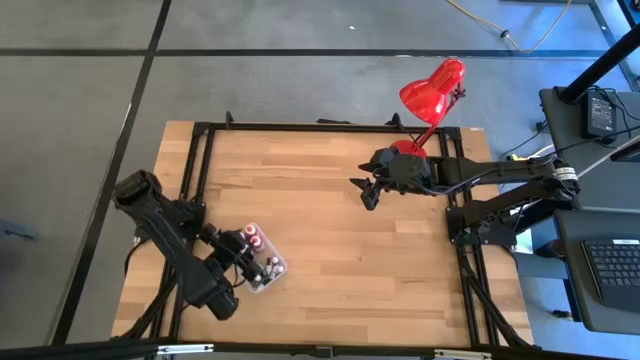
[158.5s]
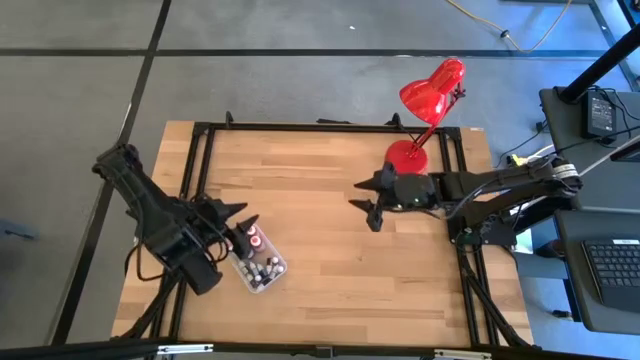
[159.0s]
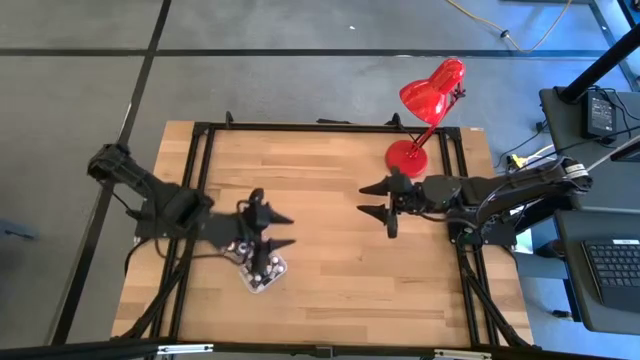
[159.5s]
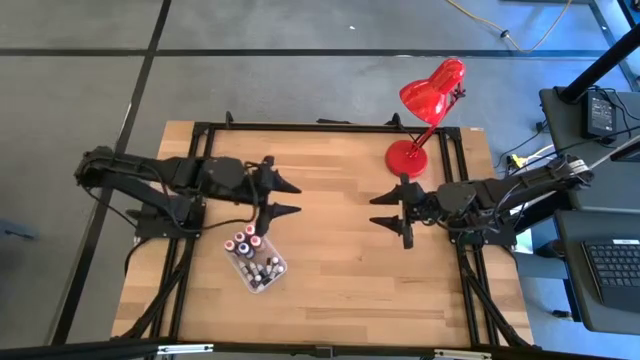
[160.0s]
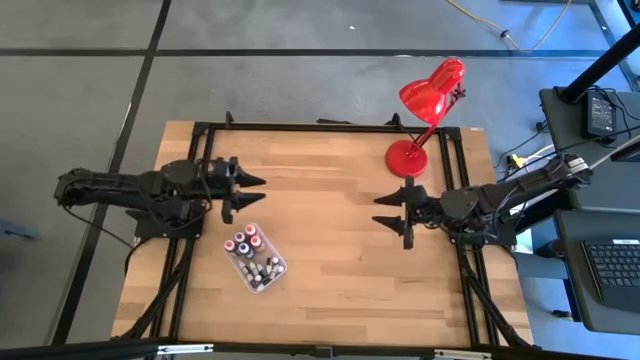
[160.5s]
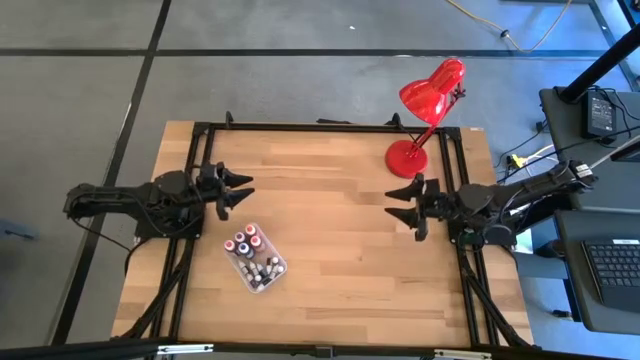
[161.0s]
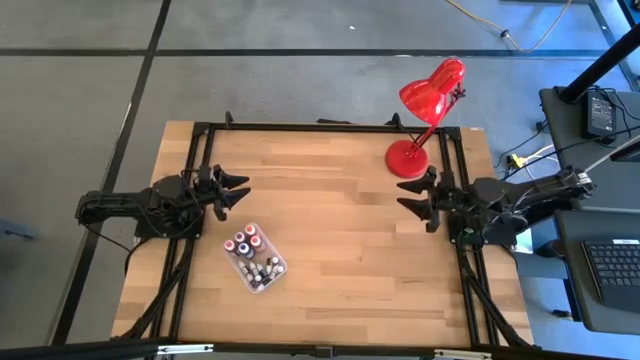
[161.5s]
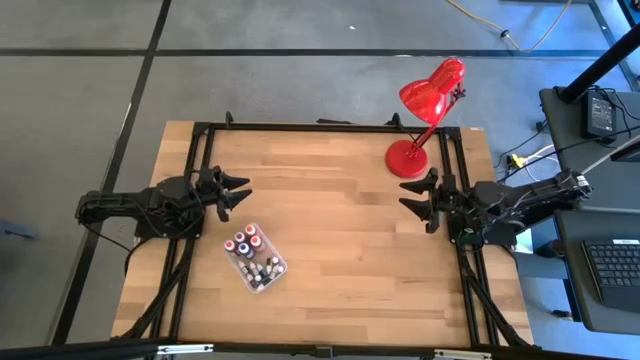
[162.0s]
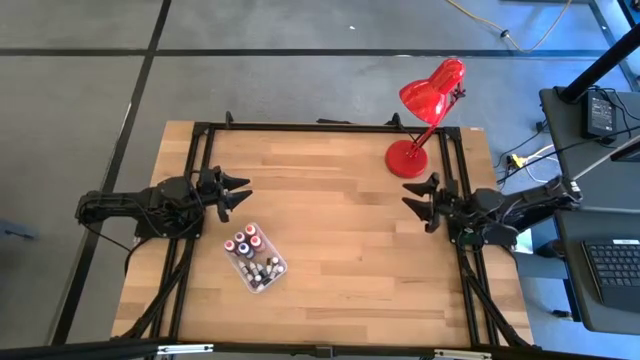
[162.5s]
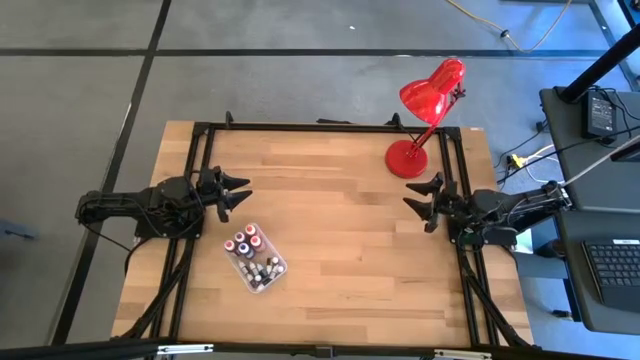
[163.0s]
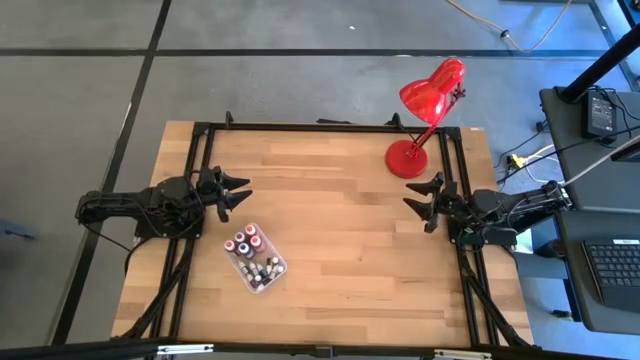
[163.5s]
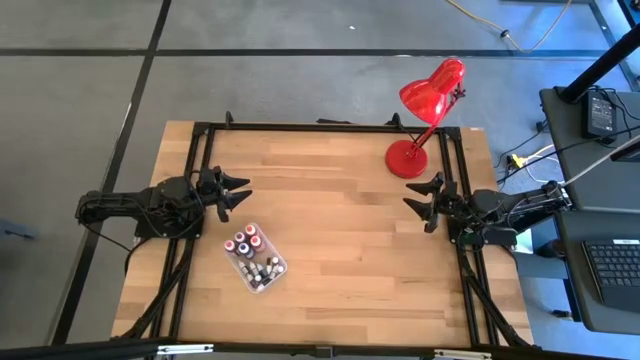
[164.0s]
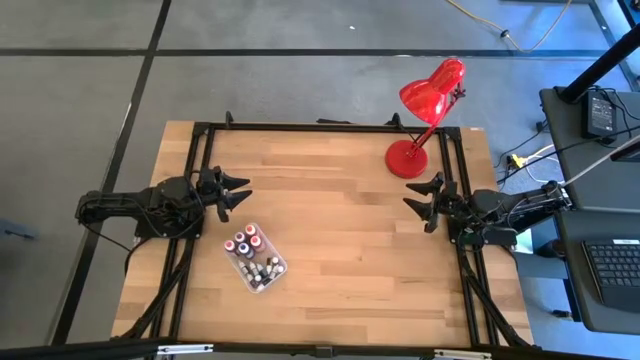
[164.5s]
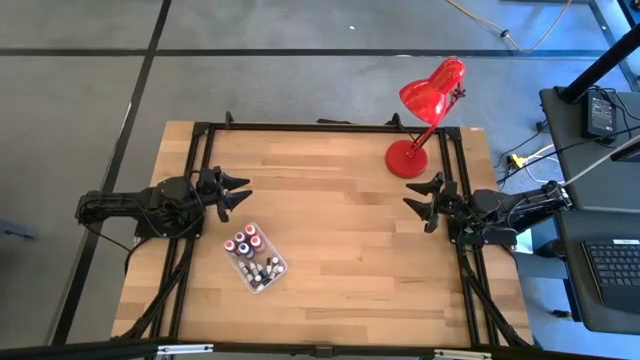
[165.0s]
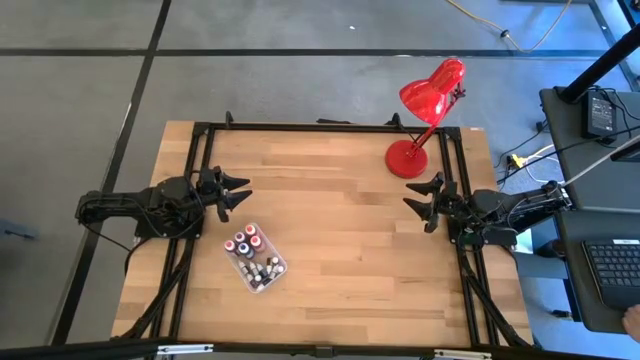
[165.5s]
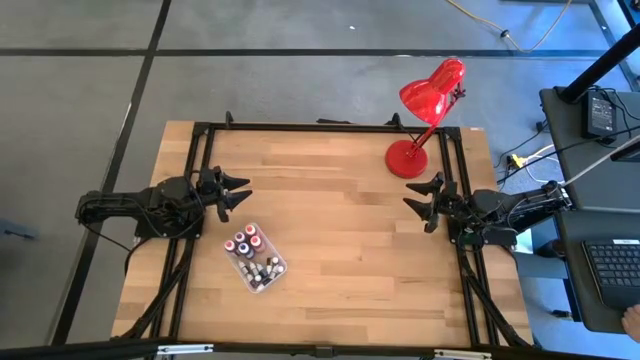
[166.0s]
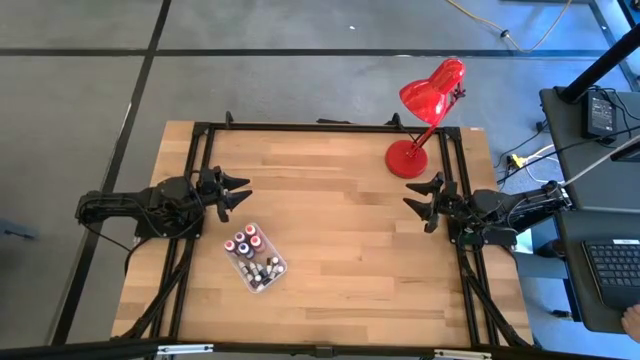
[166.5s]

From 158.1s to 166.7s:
Task: Pick & Place food coloring
Return to Home Position

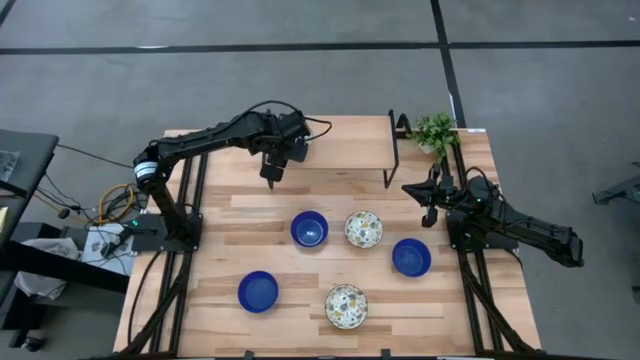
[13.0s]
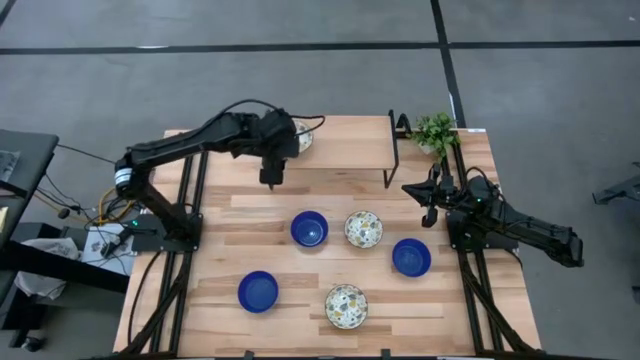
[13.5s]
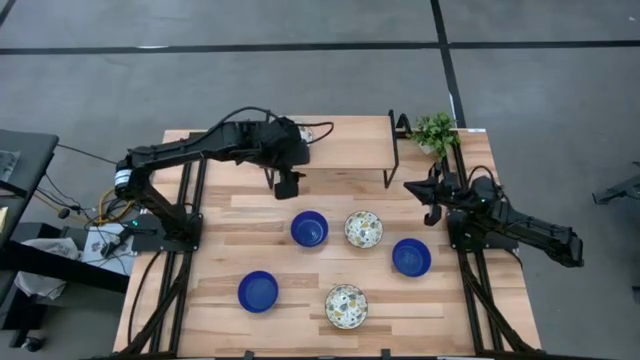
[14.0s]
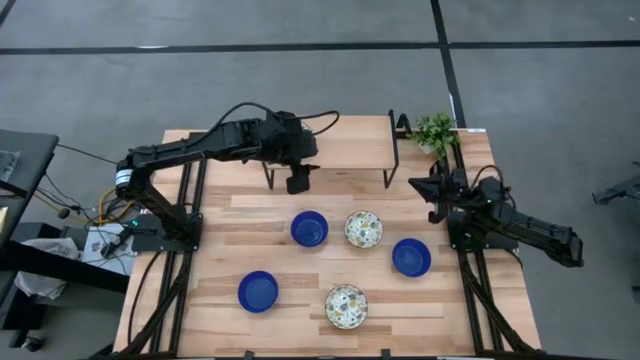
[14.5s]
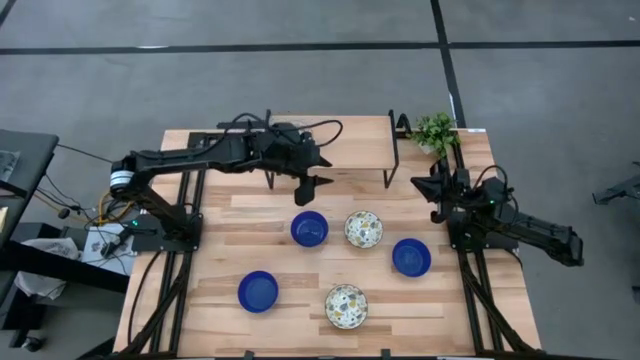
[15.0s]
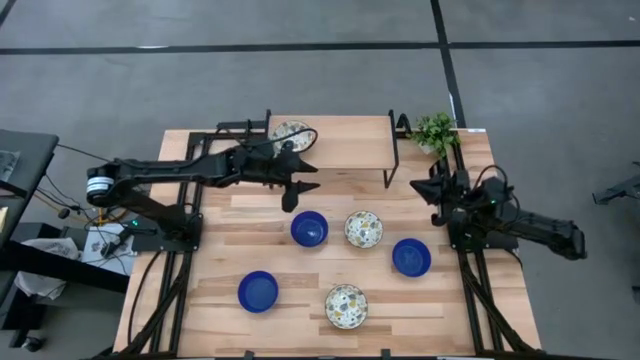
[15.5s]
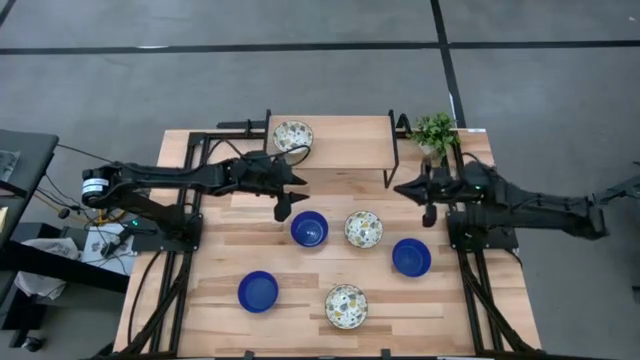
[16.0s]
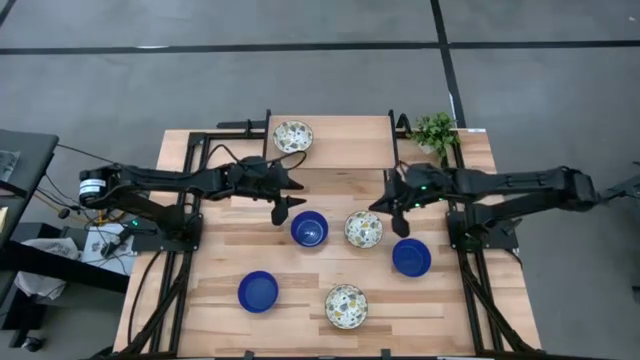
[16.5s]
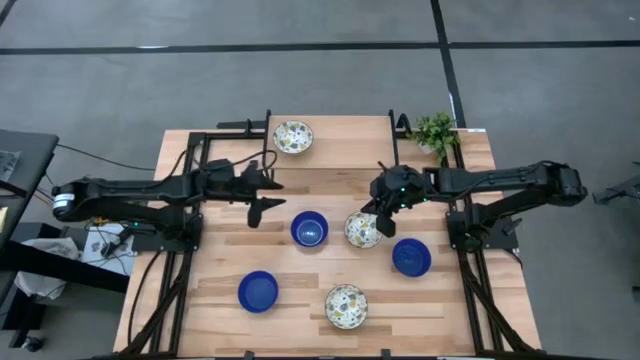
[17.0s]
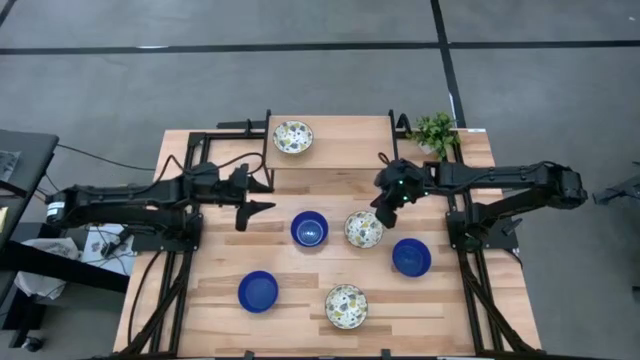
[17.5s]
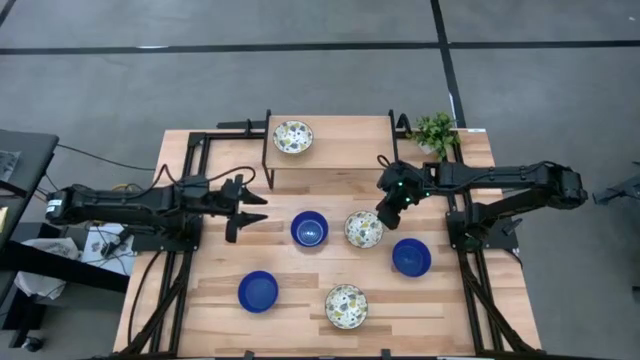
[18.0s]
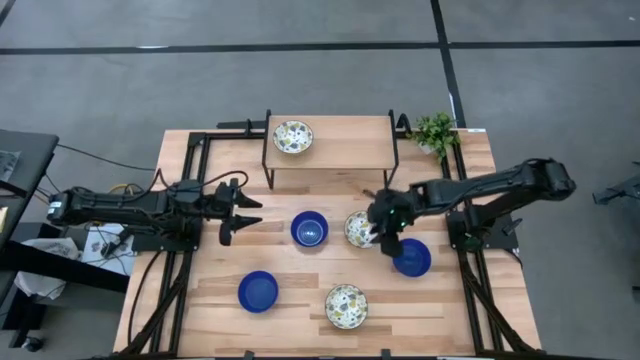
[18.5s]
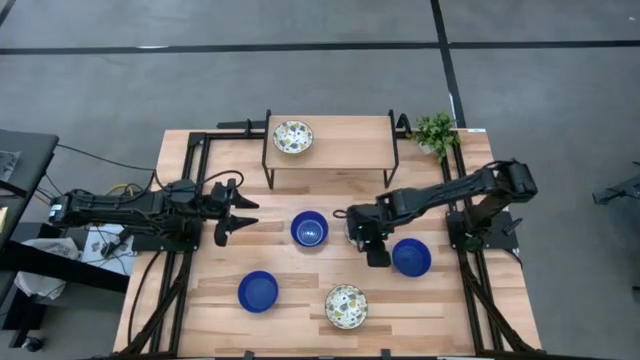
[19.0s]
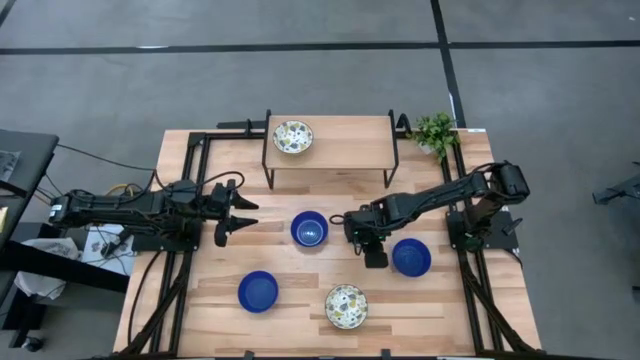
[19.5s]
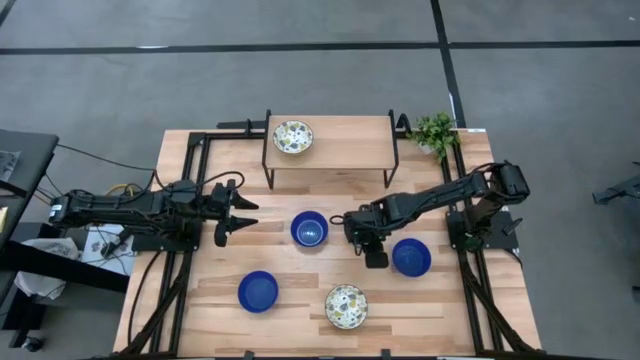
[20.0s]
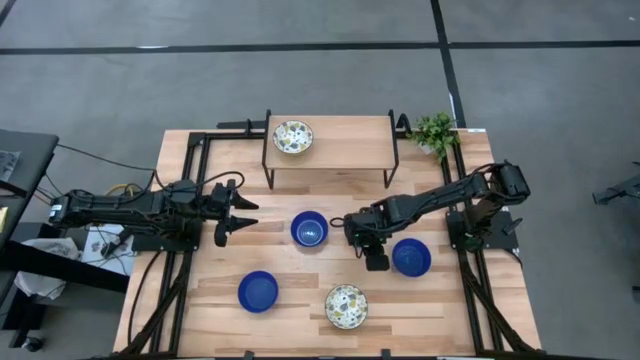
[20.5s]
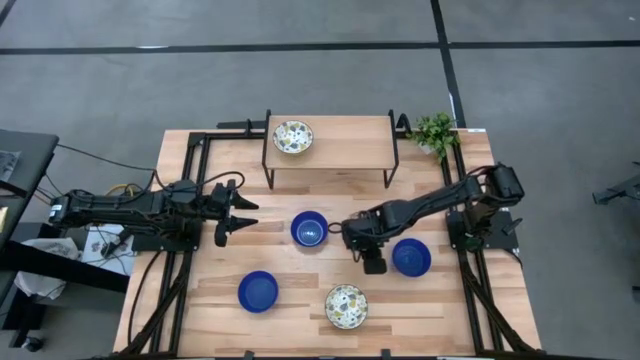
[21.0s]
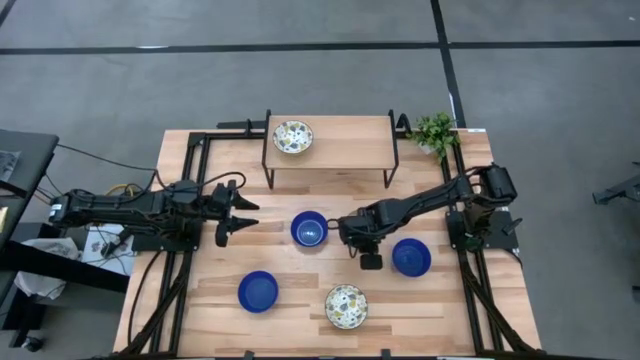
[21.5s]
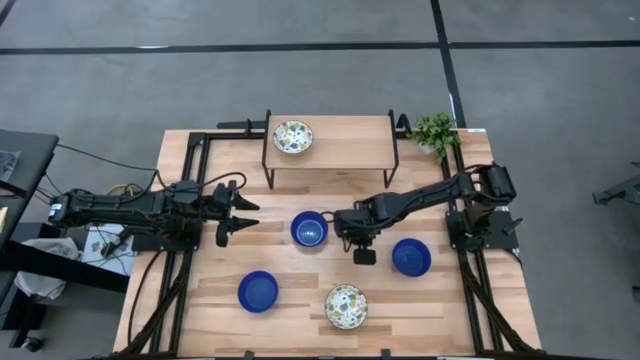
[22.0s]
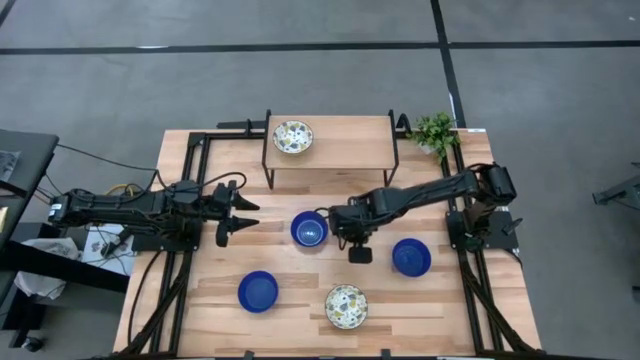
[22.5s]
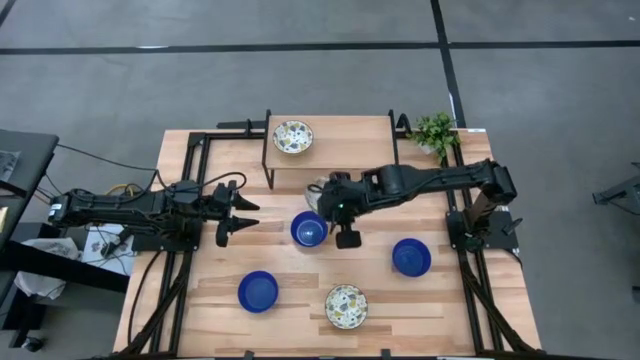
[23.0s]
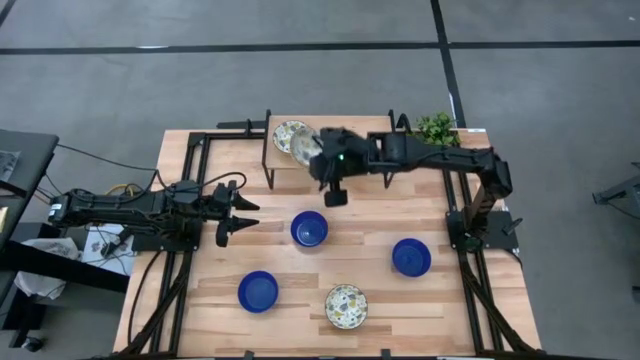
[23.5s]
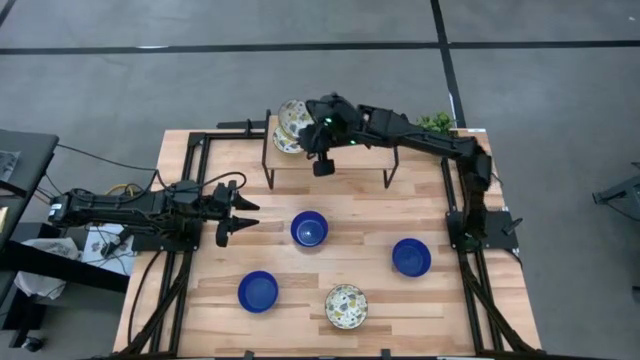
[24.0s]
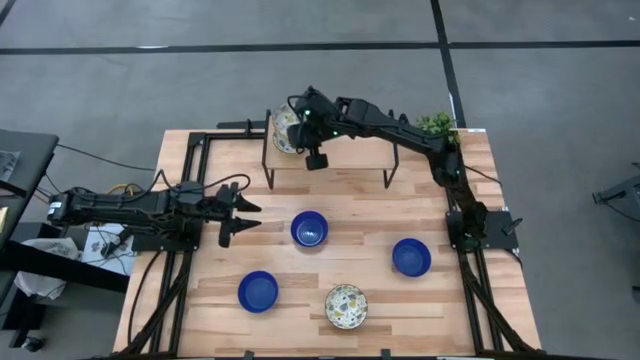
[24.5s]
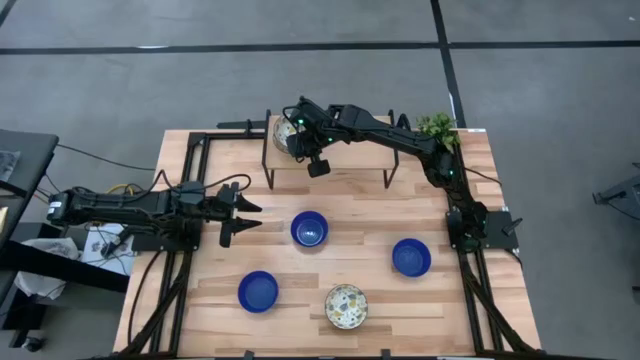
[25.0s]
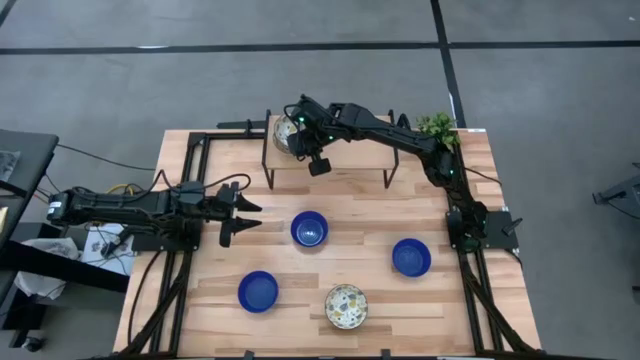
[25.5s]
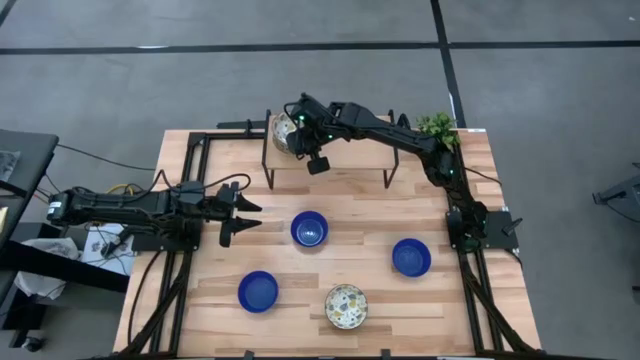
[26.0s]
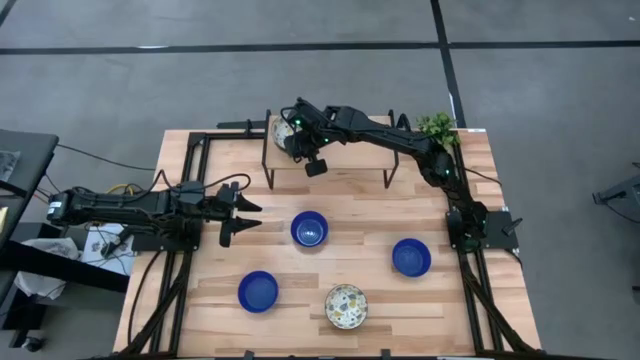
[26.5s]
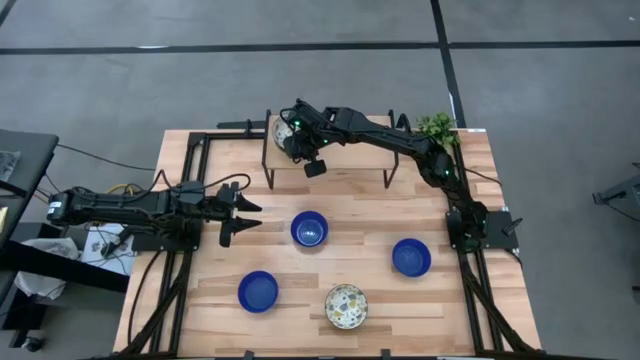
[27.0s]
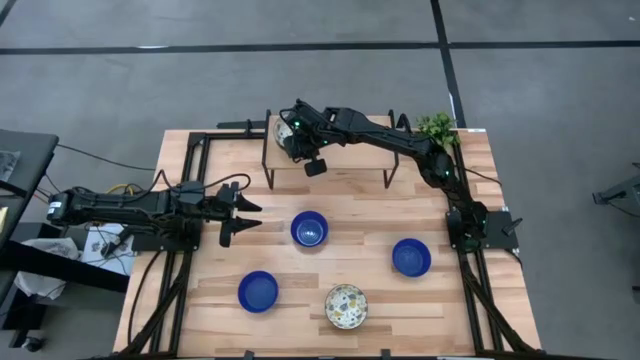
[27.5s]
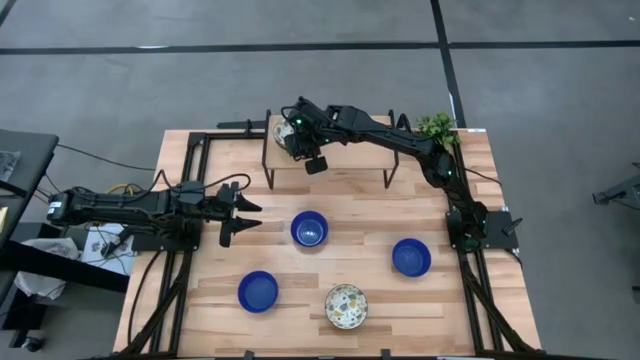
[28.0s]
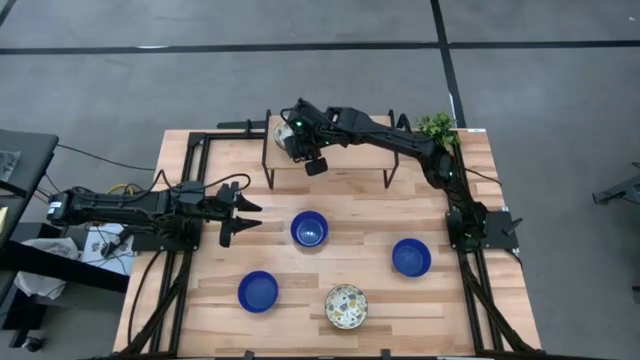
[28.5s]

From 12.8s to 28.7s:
Task: Pick & Place Mini bowls
Stack the top patterned bowl on top of the patterned cream bowl on the shelf
